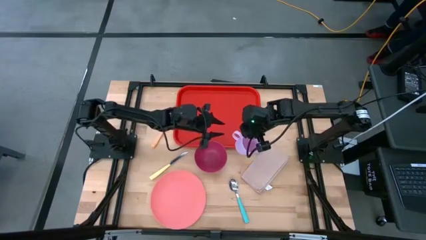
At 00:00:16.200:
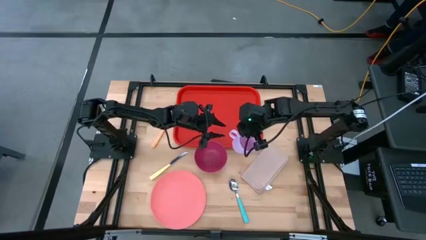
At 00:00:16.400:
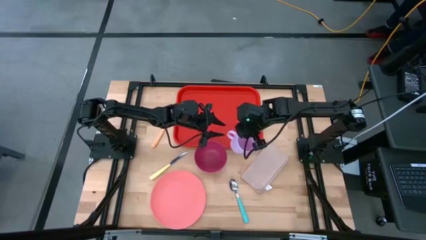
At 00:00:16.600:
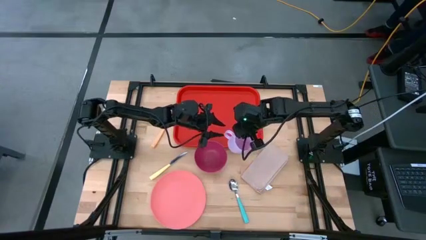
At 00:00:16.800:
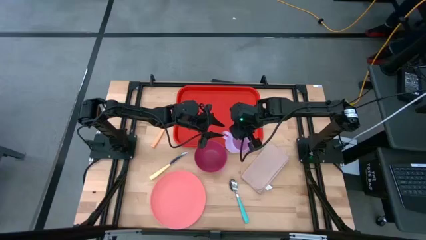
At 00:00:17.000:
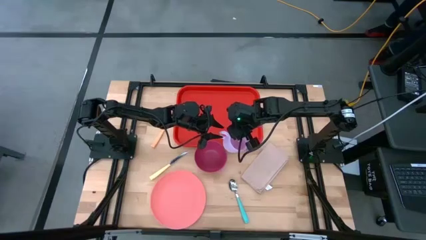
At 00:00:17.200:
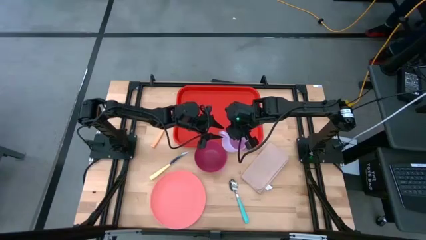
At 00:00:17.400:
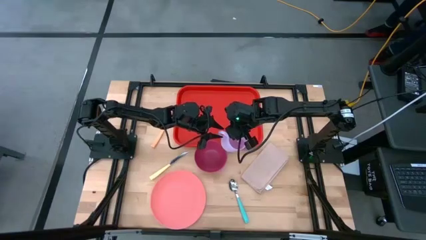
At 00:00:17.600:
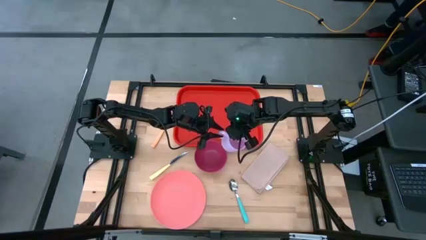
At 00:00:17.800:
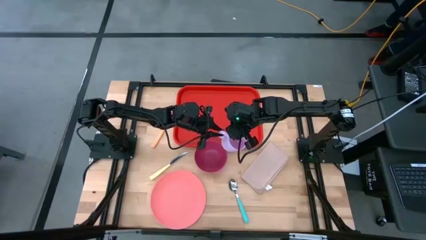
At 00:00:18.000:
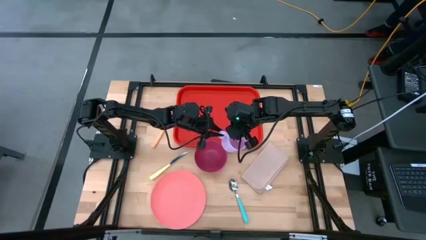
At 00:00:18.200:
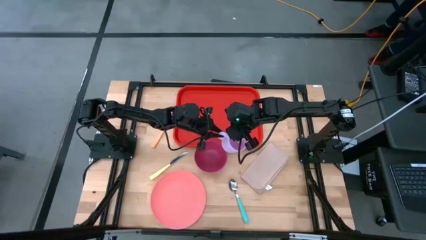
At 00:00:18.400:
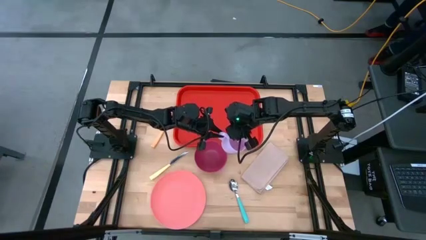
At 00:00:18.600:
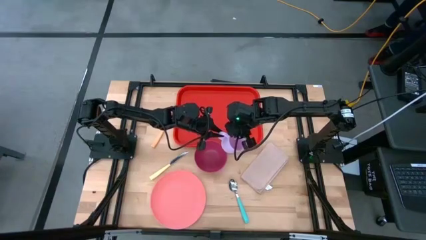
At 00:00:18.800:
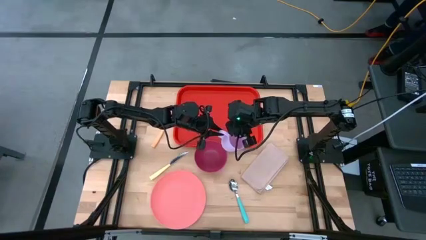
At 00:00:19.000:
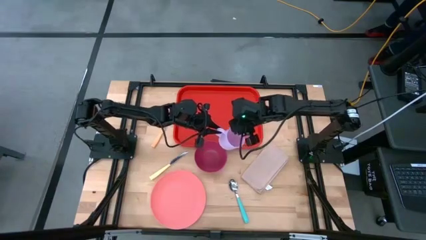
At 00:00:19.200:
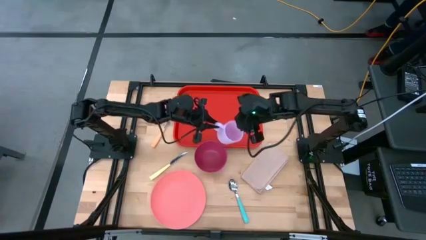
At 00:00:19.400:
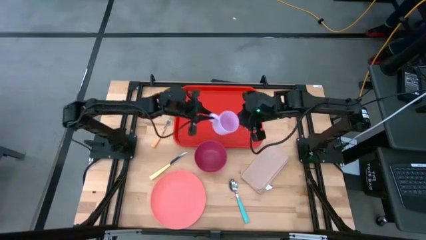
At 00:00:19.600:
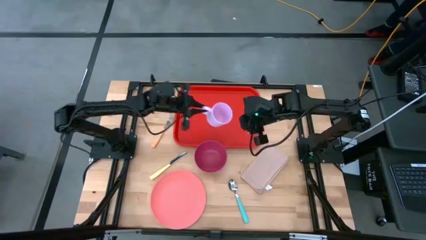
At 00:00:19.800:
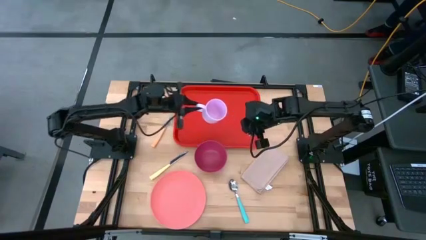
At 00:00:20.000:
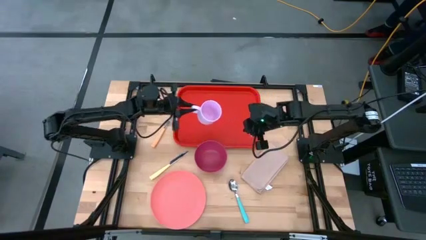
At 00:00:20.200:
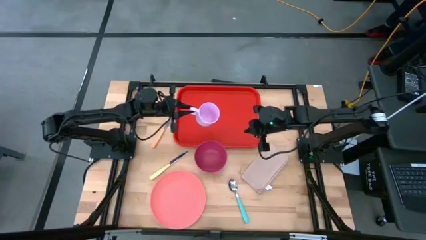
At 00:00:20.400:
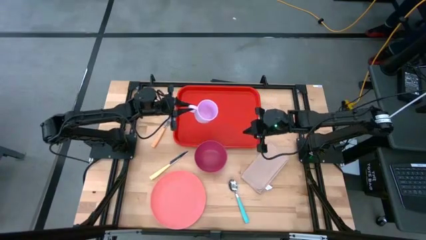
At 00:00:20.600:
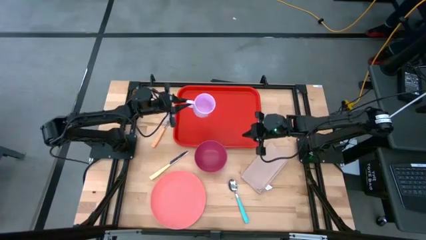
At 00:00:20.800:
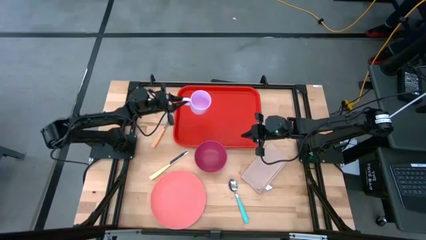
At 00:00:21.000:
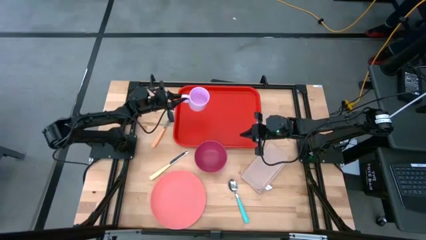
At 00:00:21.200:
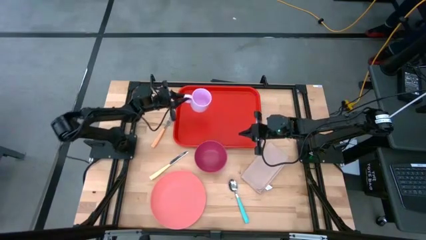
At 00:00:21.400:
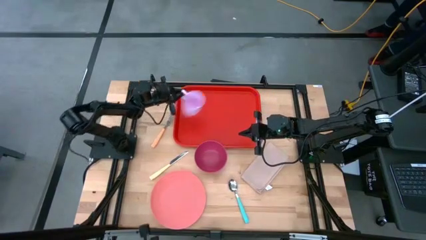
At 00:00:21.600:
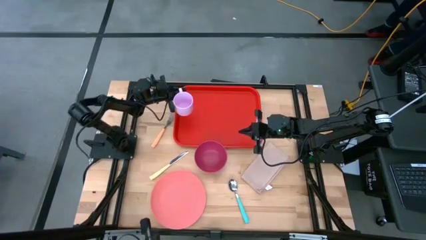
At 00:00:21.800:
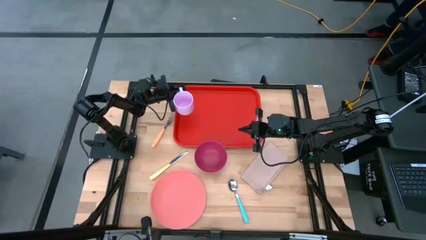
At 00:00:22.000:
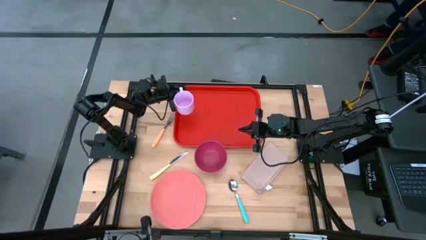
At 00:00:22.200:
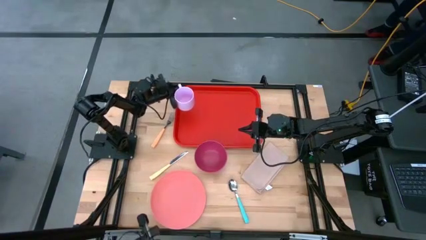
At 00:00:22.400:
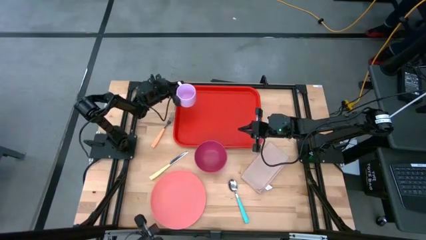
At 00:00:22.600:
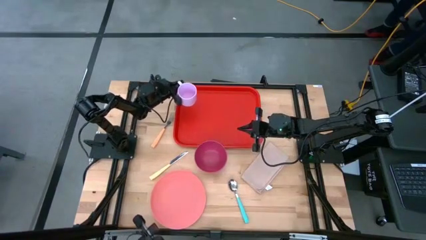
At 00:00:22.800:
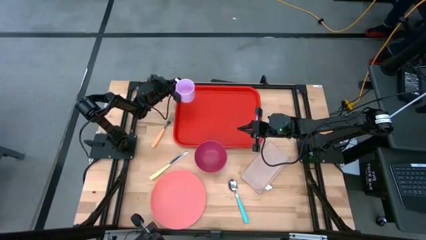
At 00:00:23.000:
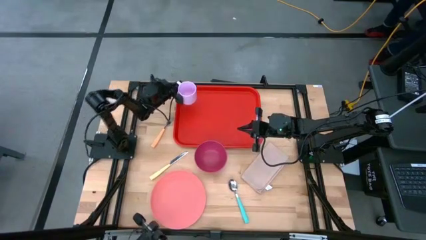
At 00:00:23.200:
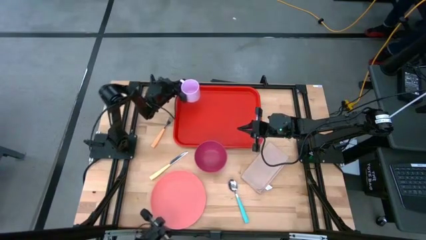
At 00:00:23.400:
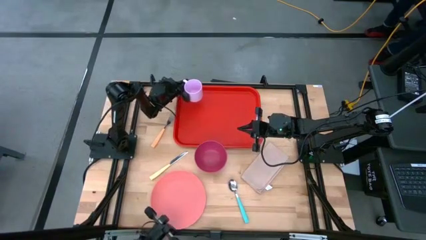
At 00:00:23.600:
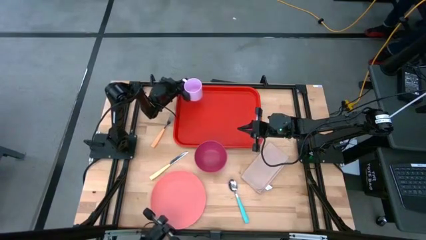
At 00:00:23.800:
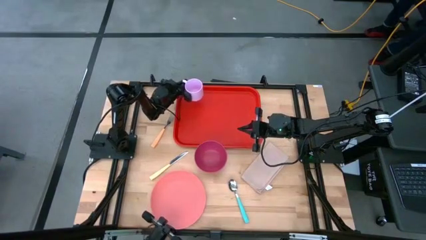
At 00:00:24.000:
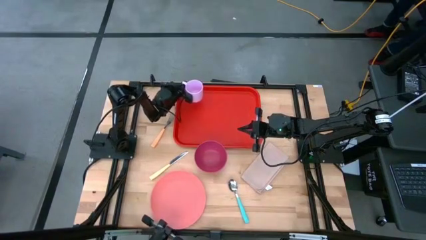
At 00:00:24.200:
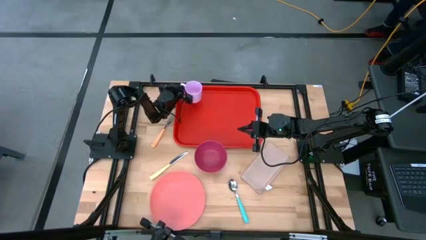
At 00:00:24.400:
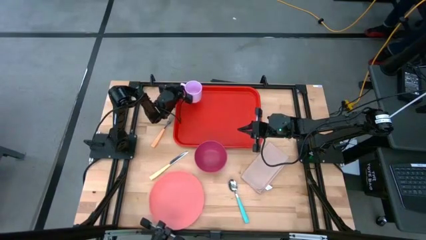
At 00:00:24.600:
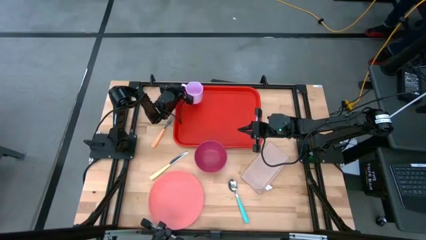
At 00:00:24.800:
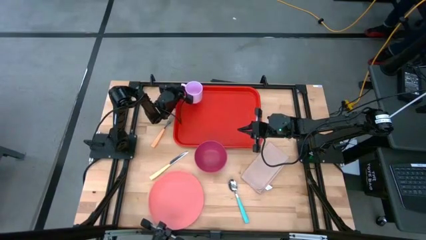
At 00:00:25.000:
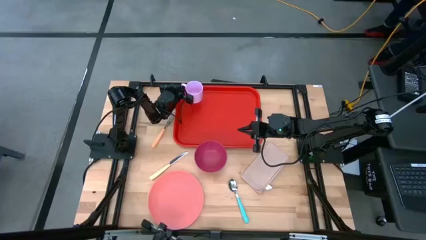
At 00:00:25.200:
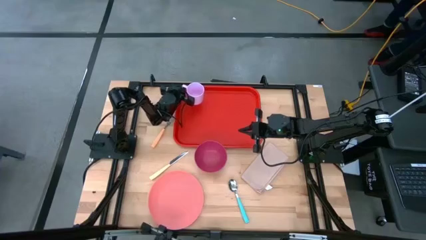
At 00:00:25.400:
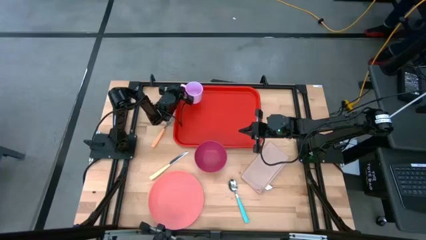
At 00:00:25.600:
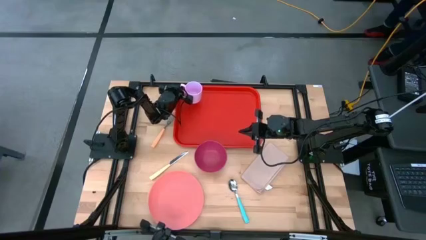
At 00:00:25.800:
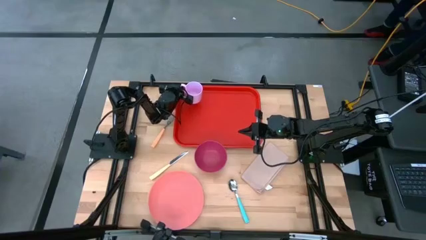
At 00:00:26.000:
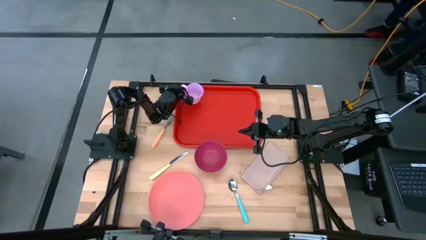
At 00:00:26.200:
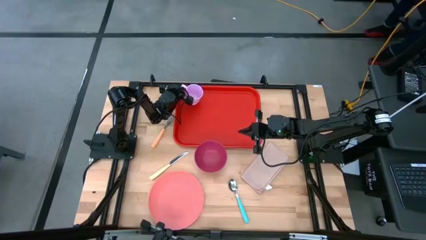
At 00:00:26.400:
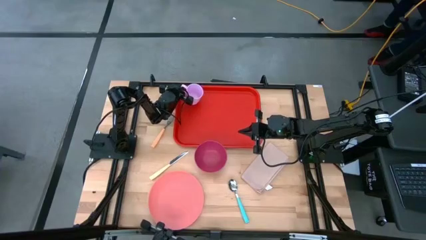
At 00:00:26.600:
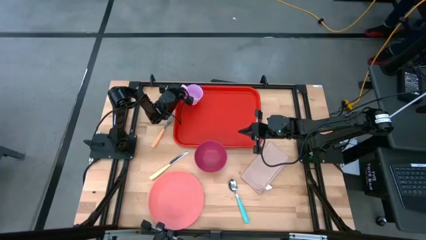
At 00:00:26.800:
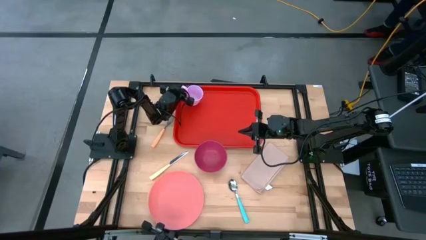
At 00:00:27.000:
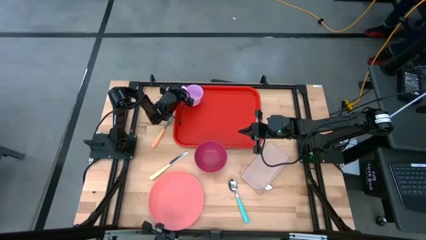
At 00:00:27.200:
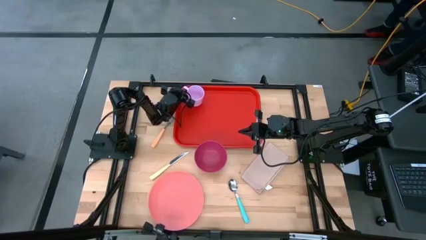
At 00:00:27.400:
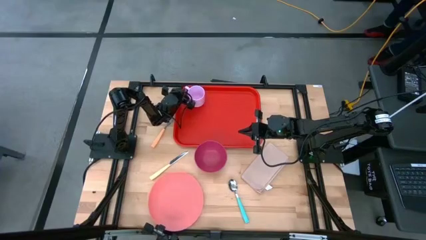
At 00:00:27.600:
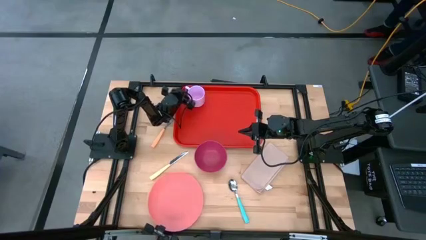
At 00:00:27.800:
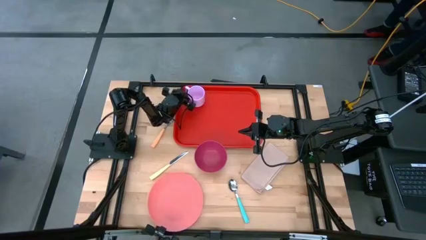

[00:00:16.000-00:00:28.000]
Task: Set up tray
Put the light purple mug on the red tray

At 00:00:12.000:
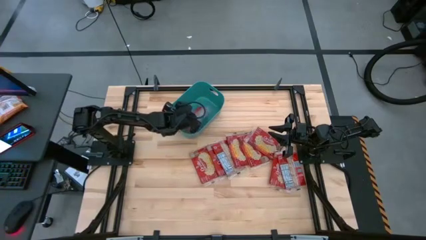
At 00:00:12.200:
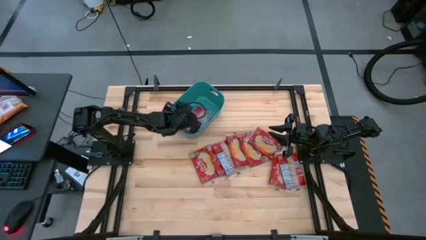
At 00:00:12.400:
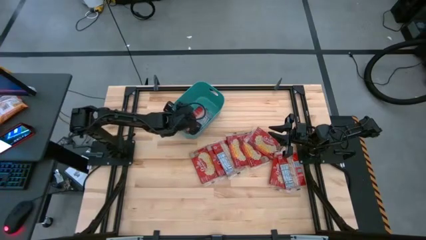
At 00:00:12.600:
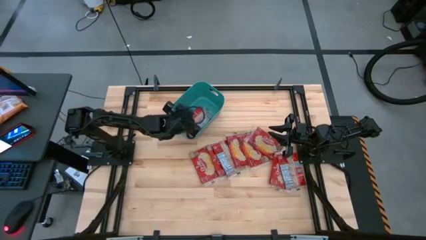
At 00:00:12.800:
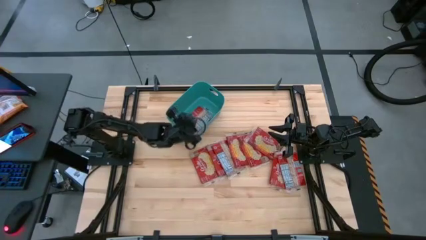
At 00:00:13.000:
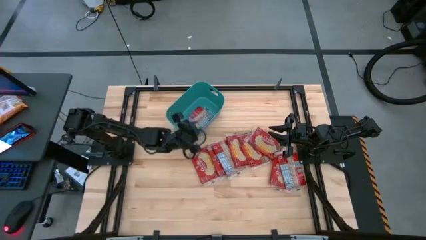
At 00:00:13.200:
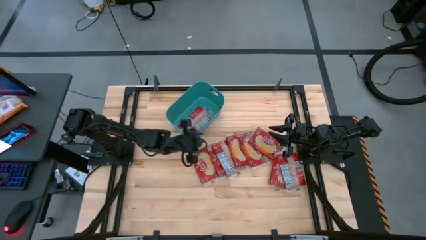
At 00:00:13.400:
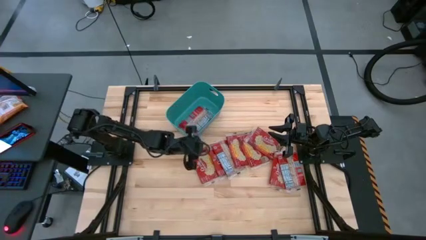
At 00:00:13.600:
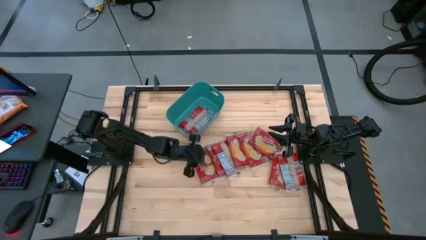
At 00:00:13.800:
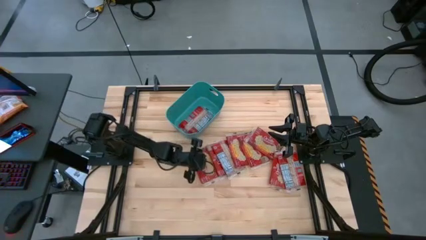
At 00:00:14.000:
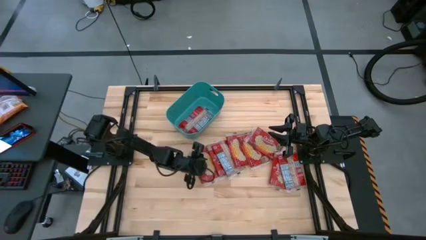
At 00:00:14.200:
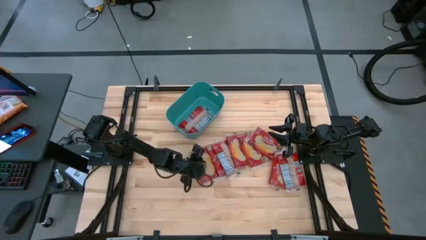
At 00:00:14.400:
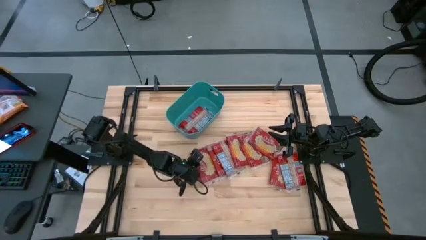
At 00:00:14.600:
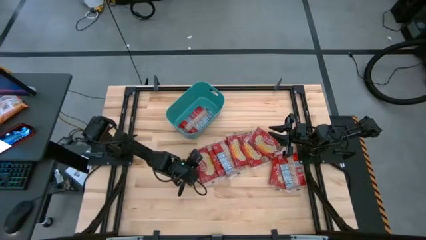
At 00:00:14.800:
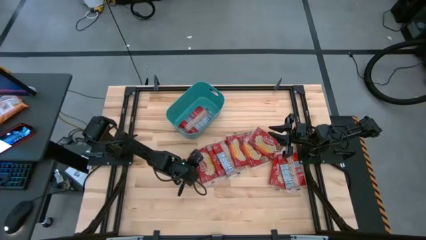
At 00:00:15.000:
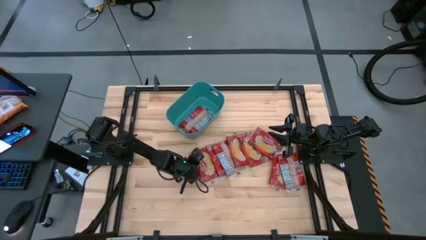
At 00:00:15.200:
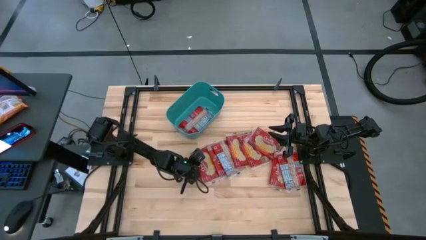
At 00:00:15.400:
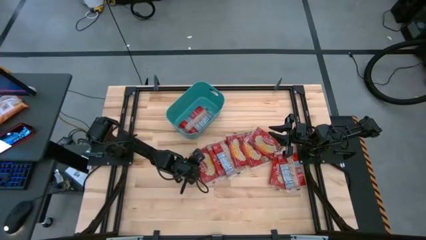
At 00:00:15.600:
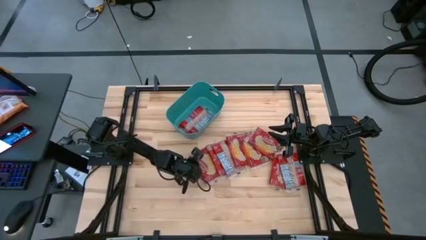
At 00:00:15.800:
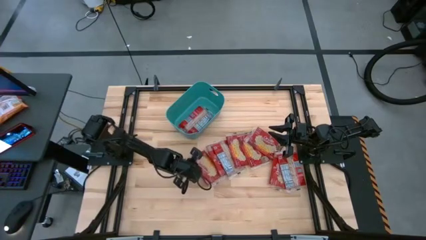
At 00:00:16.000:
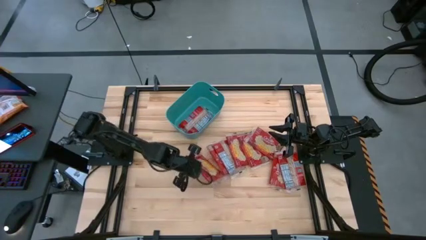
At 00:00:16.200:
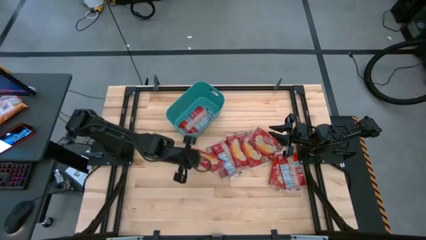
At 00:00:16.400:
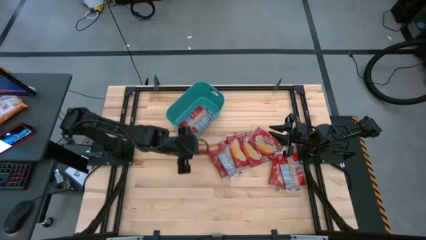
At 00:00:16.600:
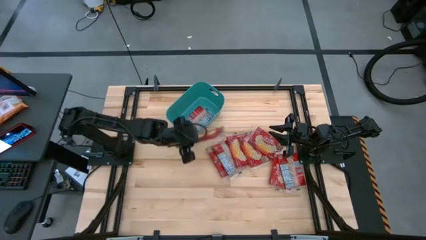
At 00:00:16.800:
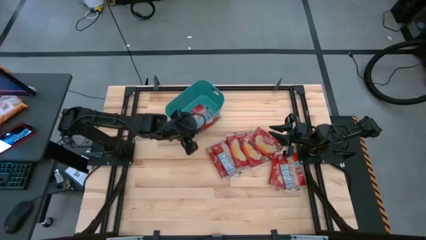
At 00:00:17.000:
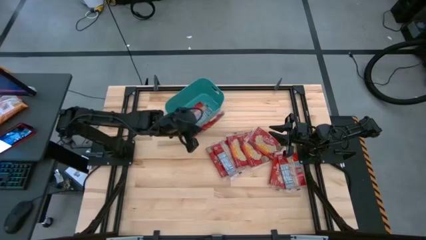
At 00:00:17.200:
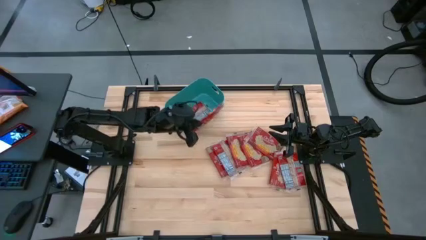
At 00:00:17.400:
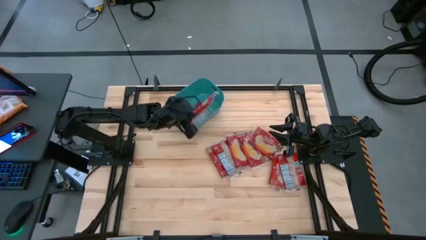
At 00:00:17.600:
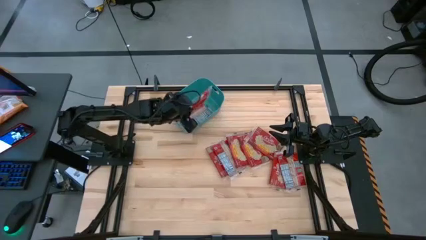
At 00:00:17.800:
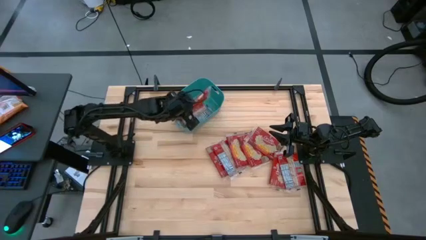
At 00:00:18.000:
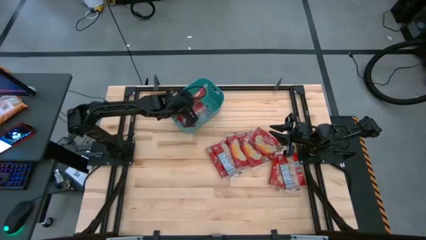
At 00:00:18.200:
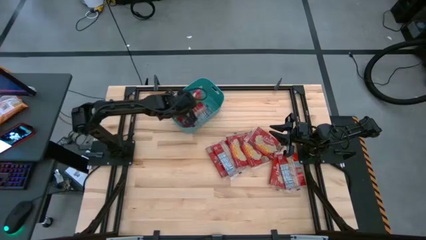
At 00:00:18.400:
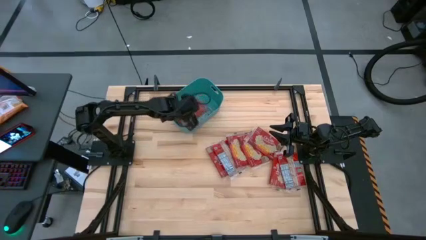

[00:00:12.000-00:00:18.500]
Task: Sort popcorn bags into baskets
Put the red popcorn bag into the green bin
